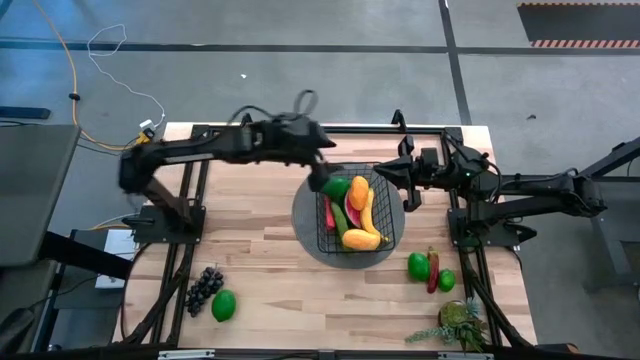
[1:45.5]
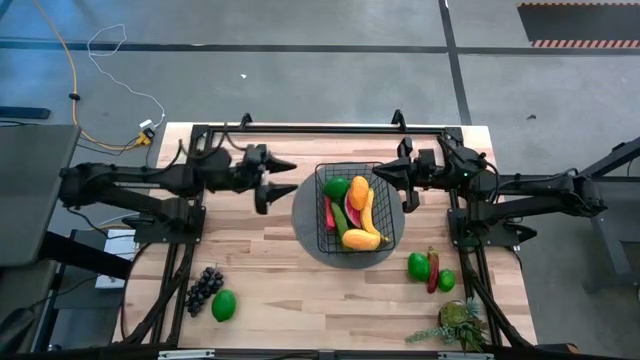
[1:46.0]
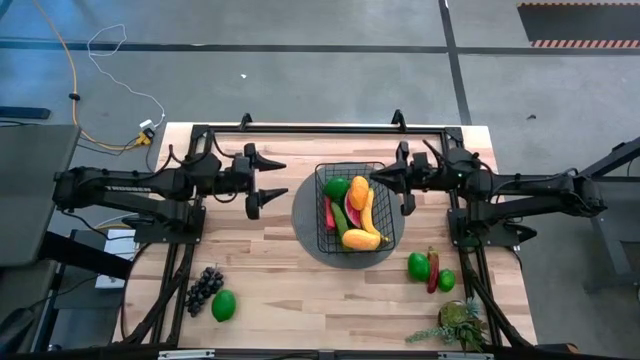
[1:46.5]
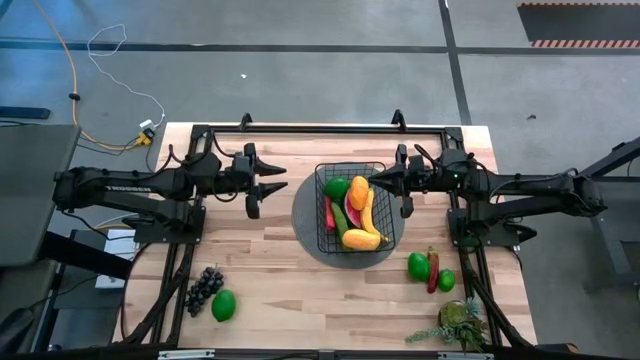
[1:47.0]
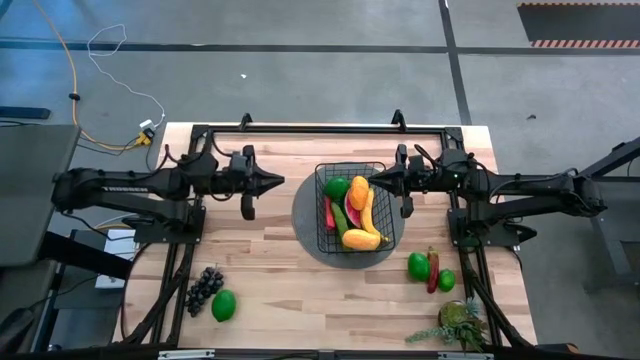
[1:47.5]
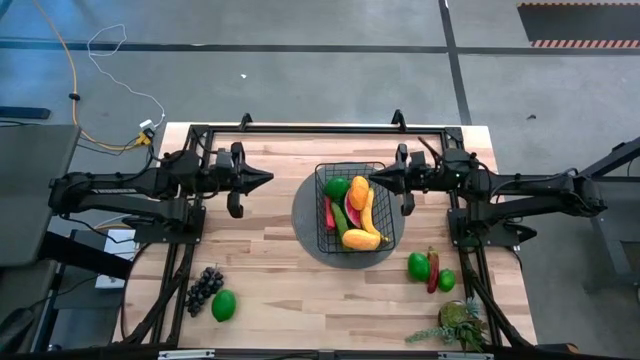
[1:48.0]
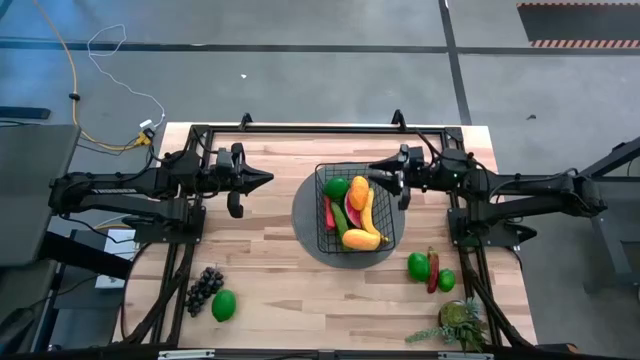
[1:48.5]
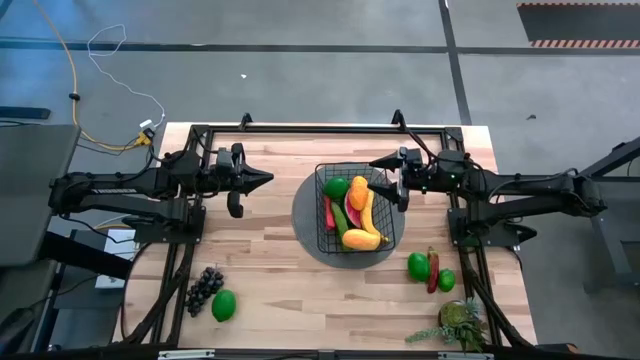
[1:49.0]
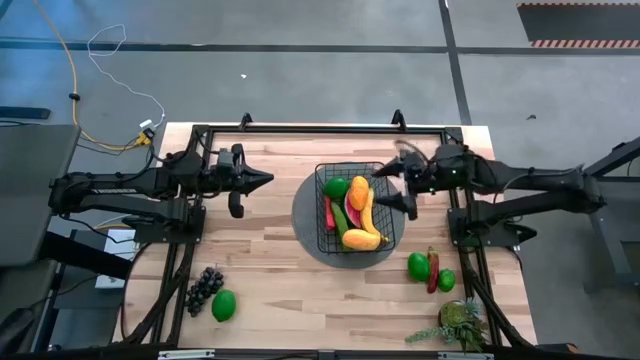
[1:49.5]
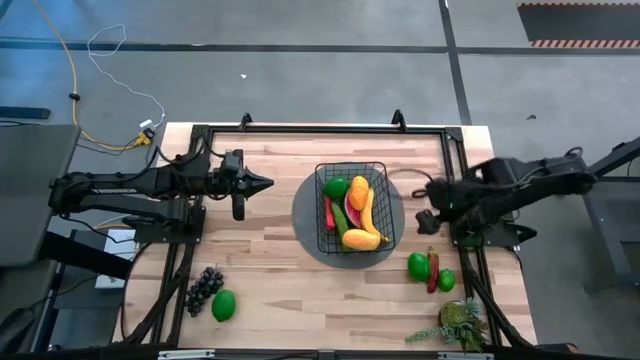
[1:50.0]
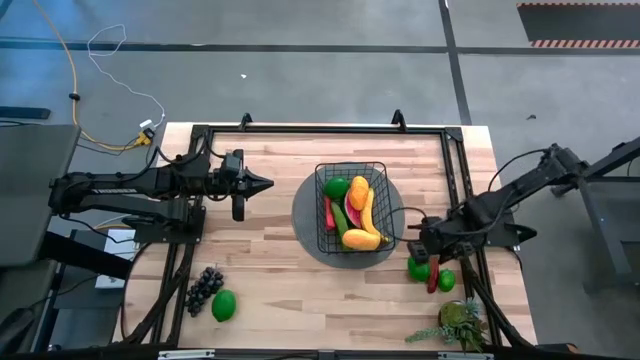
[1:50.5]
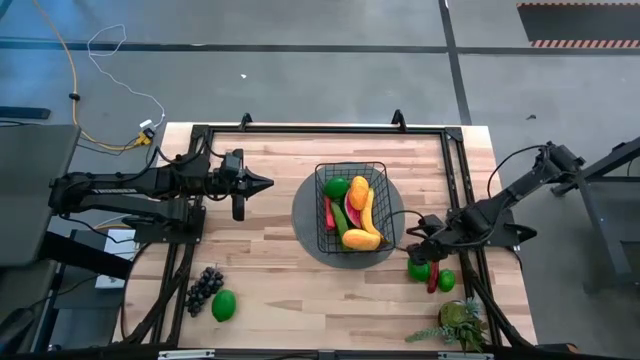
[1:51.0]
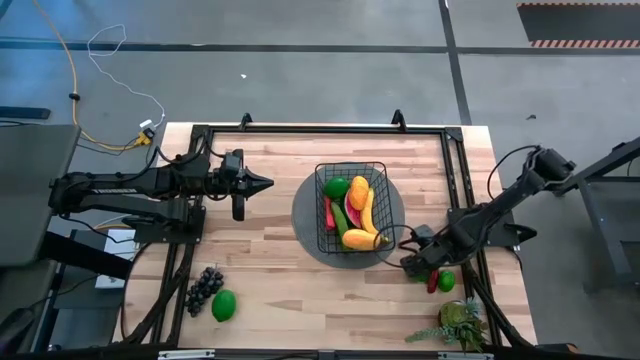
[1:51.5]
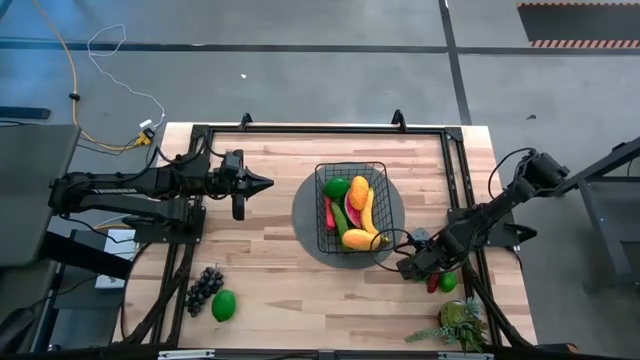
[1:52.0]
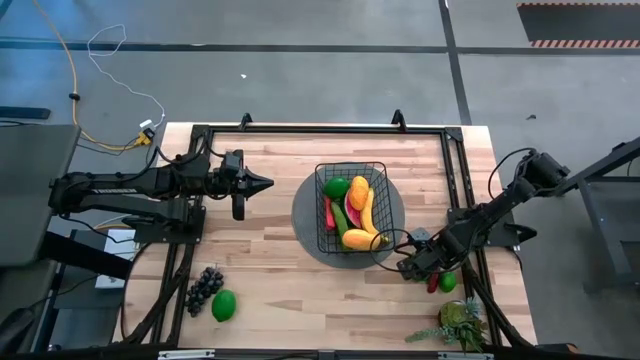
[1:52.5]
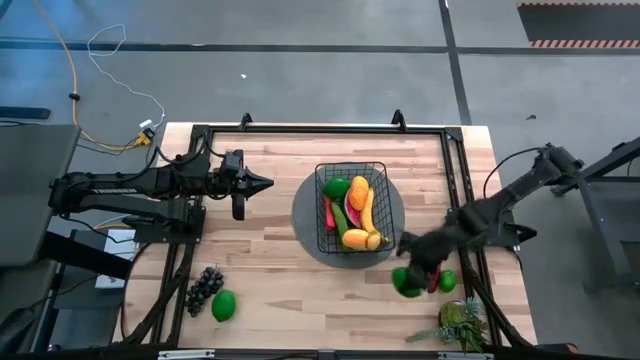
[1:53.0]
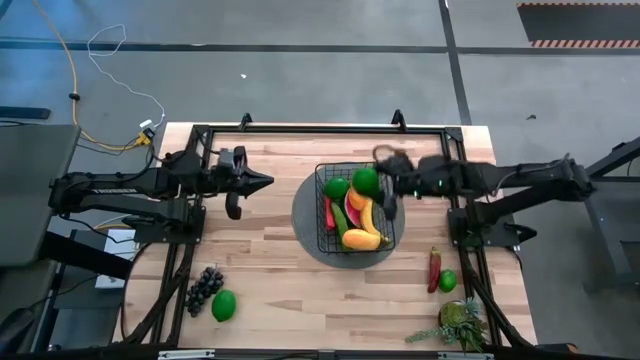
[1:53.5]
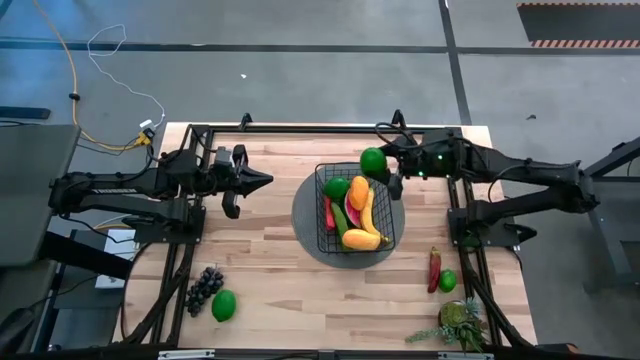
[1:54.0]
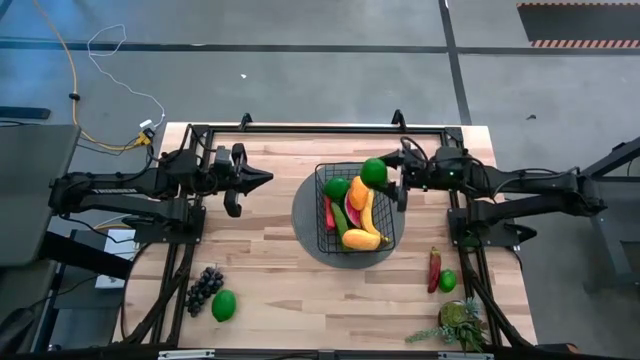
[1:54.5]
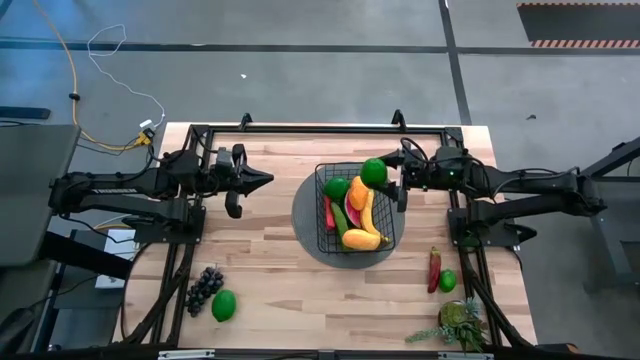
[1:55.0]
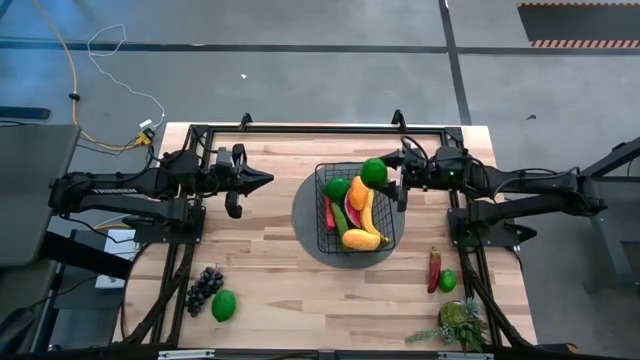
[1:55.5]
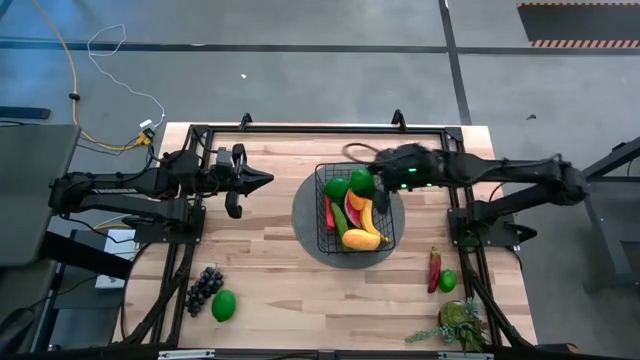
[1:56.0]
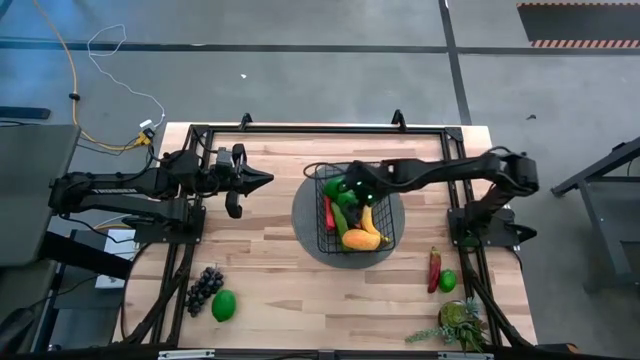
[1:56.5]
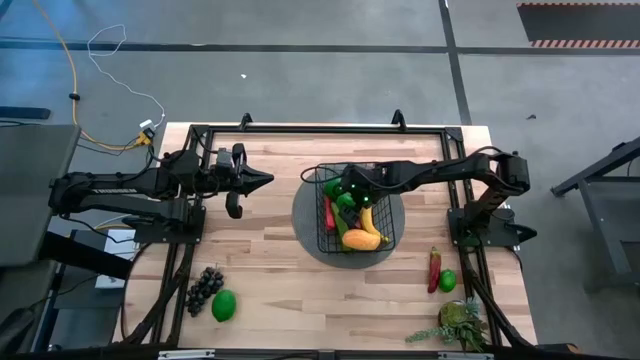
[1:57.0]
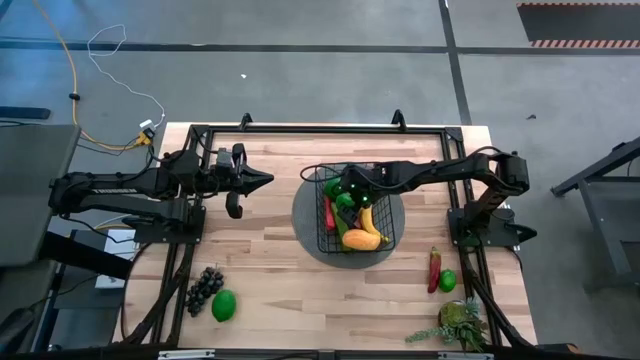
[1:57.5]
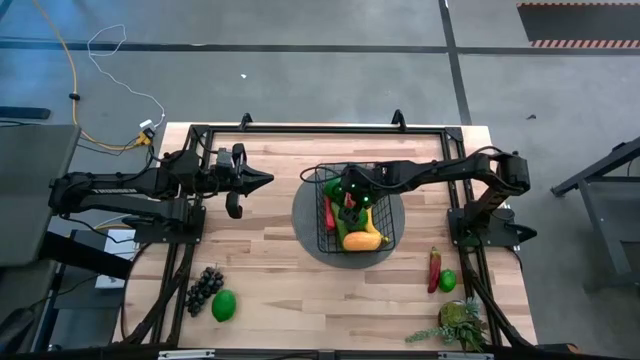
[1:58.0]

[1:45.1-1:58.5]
Task: Build produce basket
Put the green lime into the black wire basket

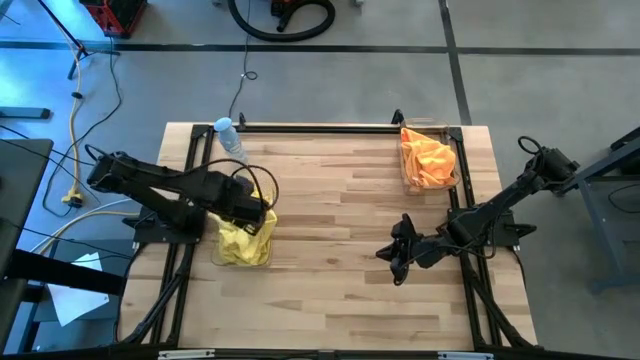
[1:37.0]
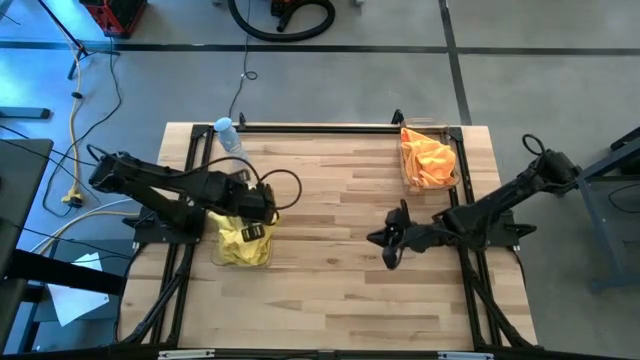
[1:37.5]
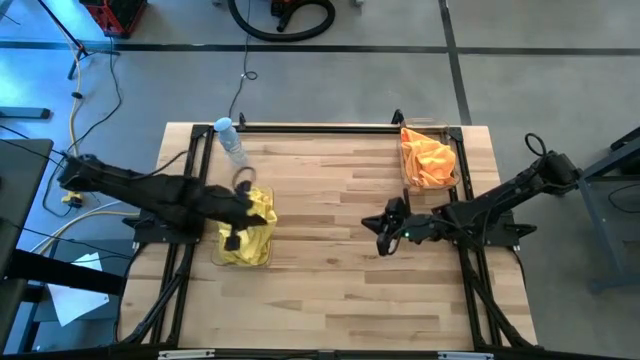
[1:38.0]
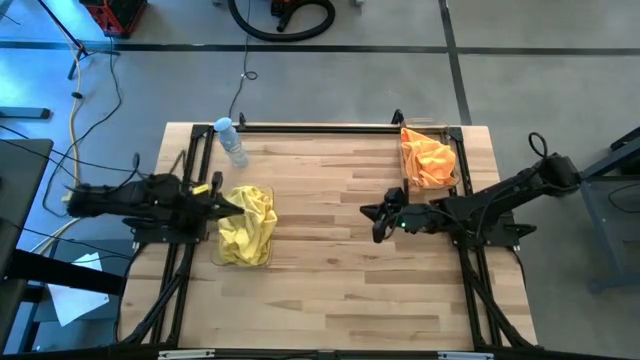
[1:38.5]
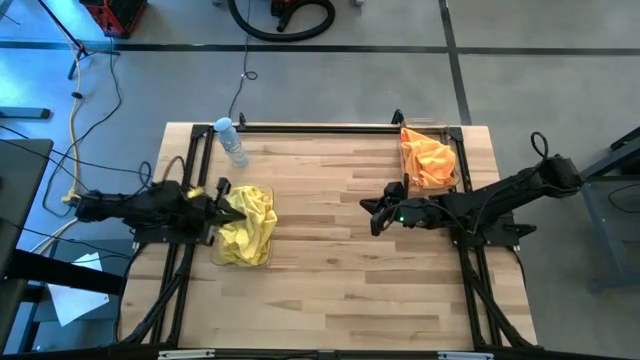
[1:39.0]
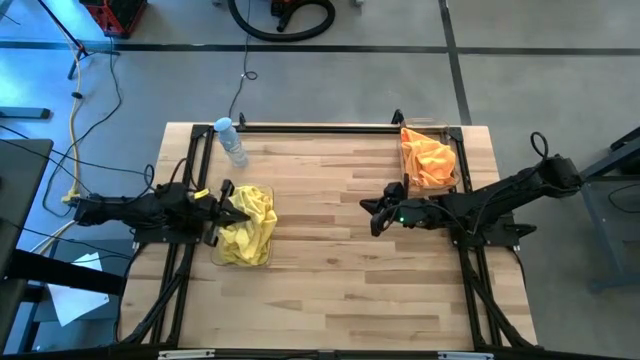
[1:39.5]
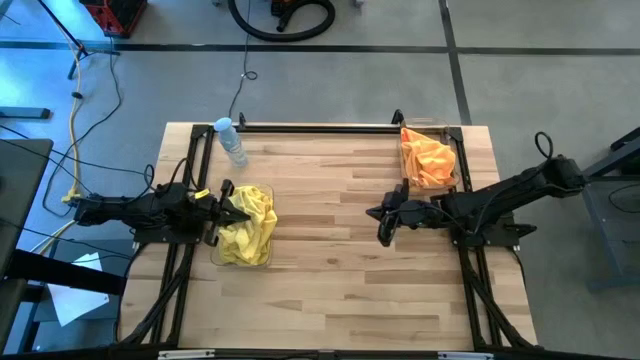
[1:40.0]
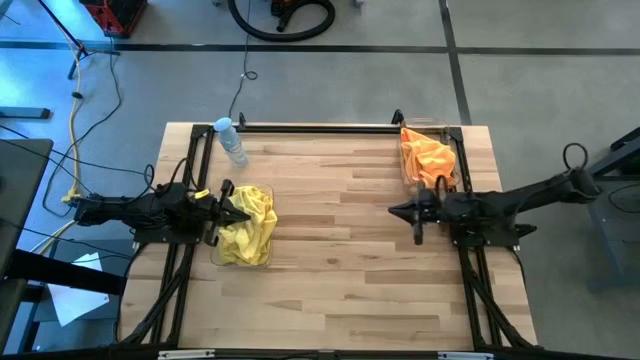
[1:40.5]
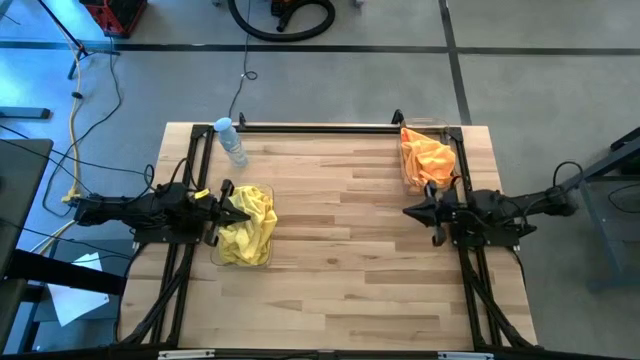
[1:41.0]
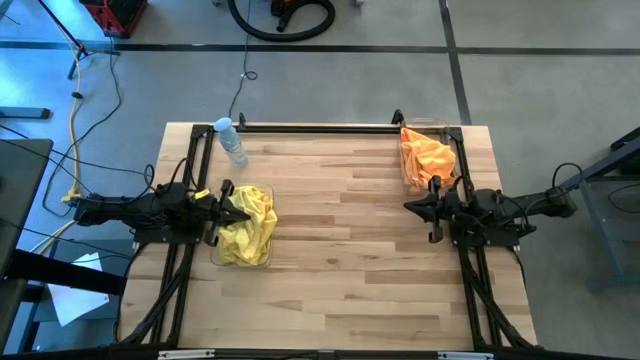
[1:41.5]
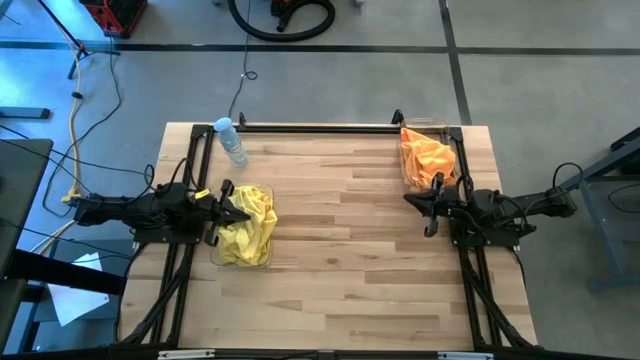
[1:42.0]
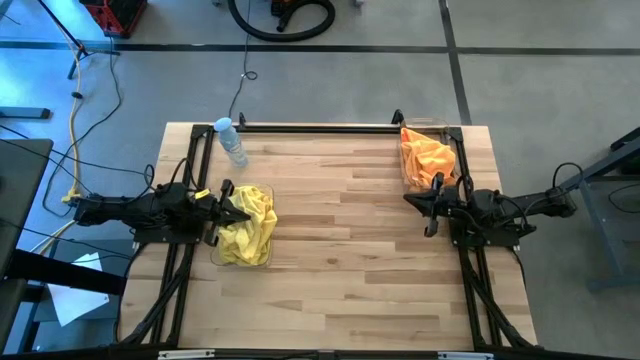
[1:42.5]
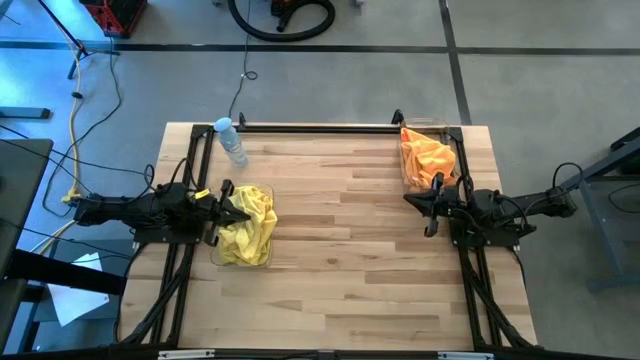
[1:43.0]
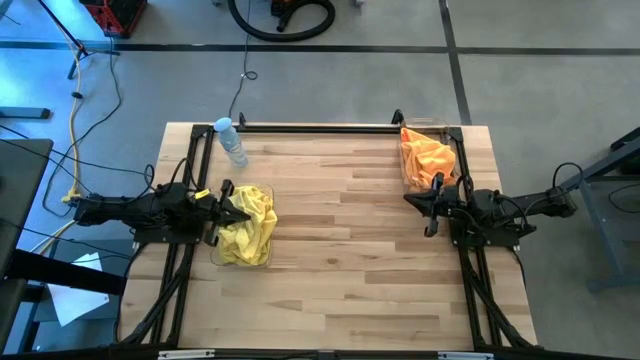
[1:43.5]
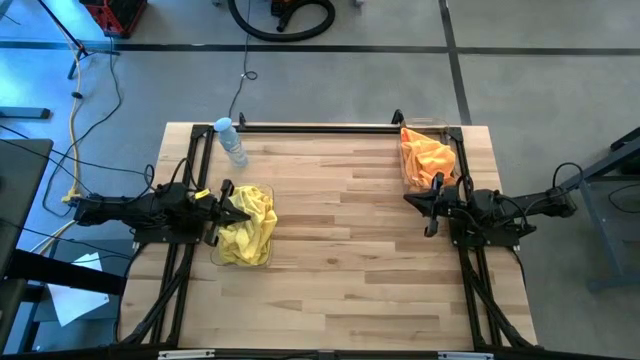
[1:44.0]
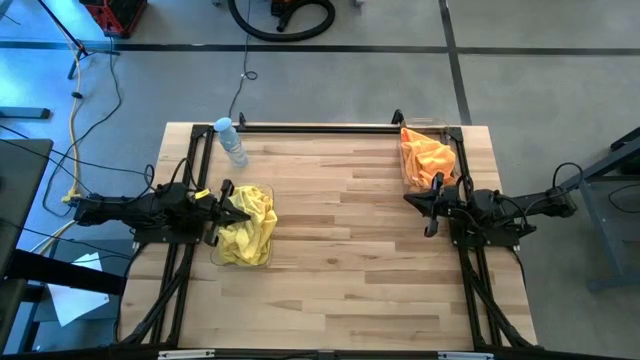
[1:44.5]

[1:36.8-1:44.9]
Task: Sort microfiber towel by color & place in baskets
Return to Home Position
